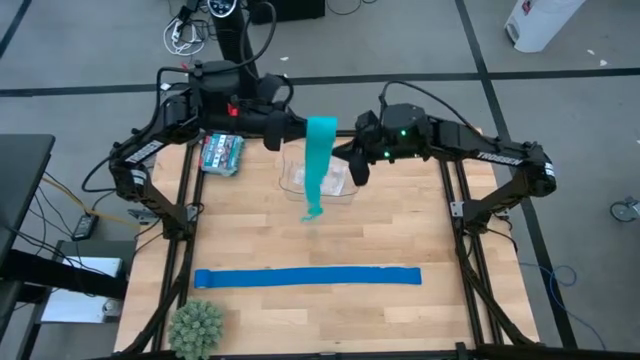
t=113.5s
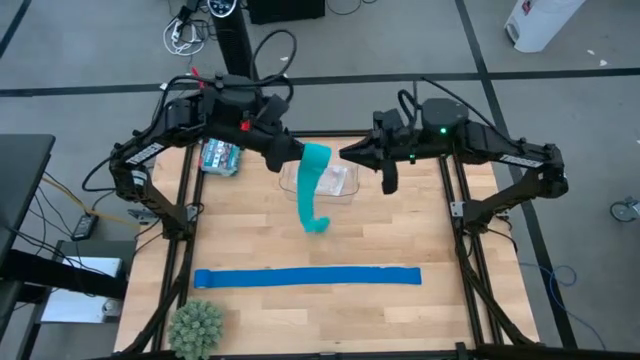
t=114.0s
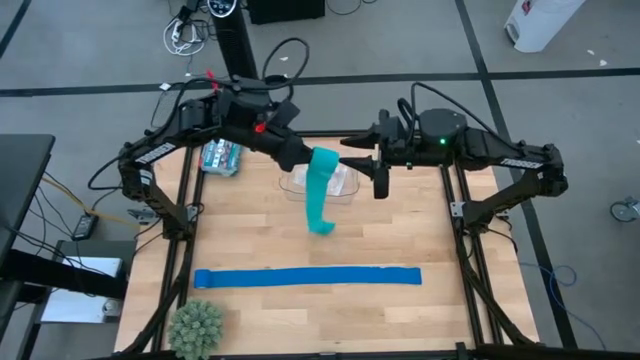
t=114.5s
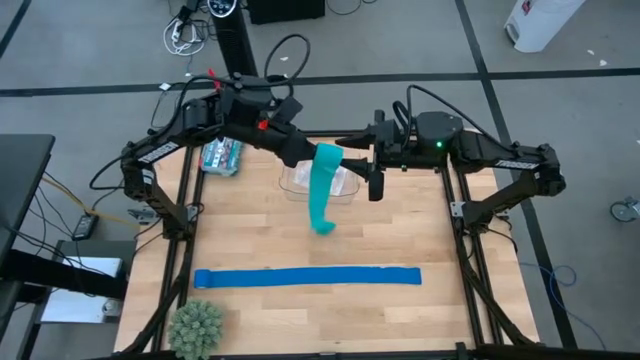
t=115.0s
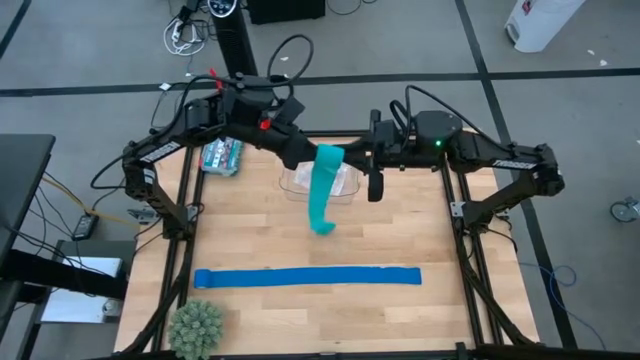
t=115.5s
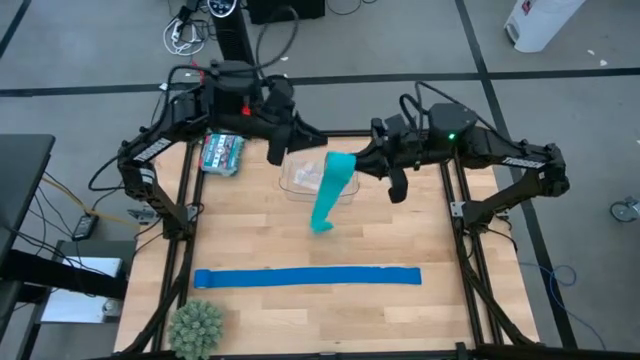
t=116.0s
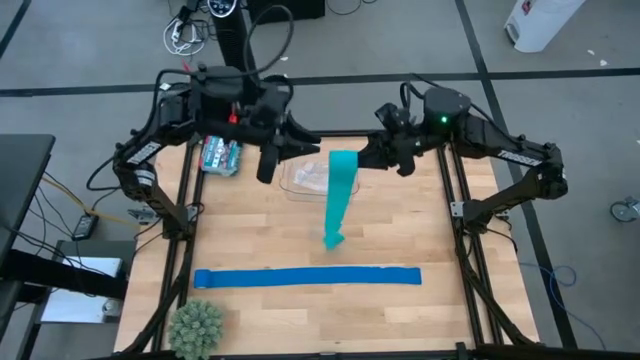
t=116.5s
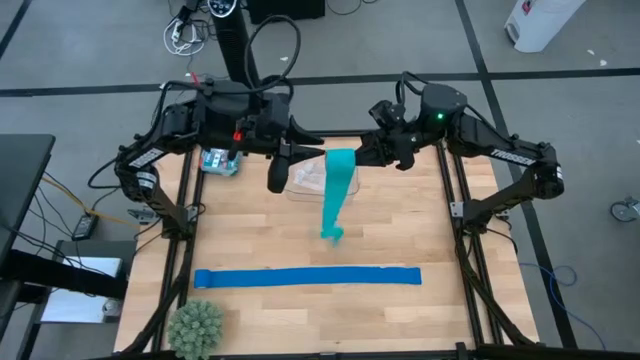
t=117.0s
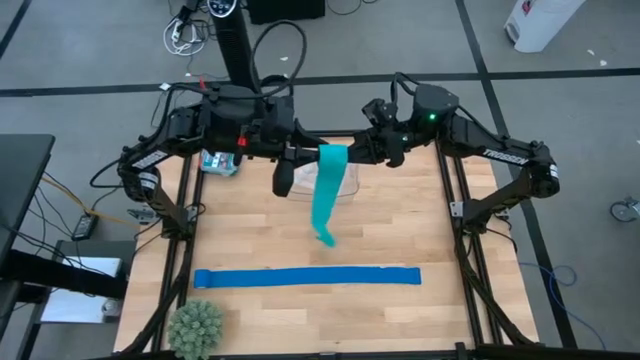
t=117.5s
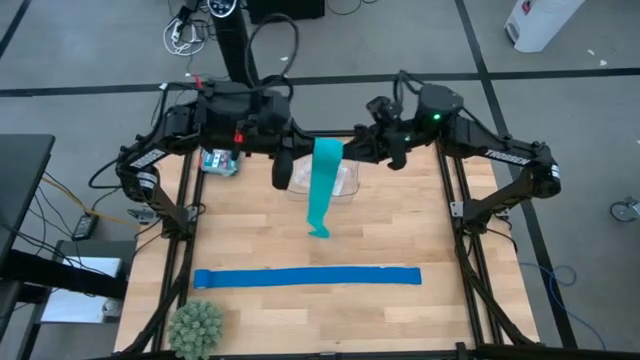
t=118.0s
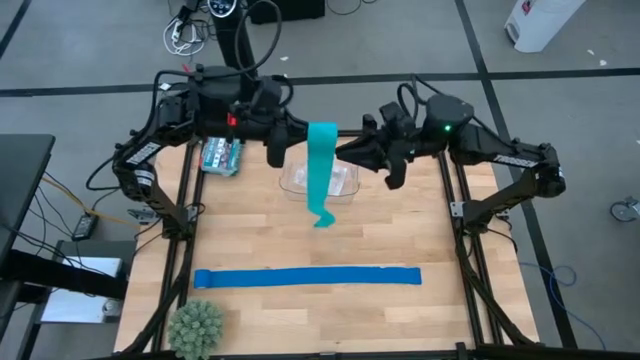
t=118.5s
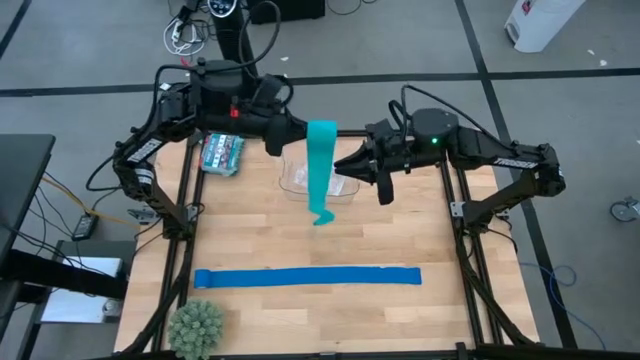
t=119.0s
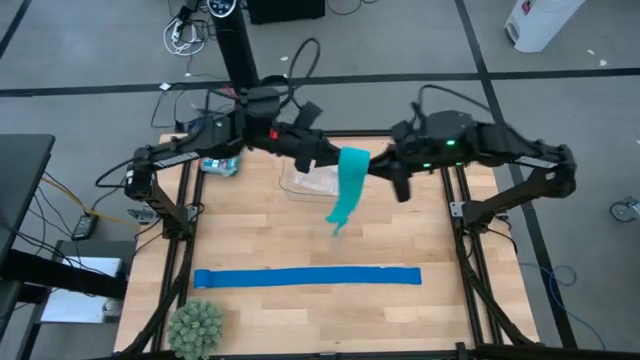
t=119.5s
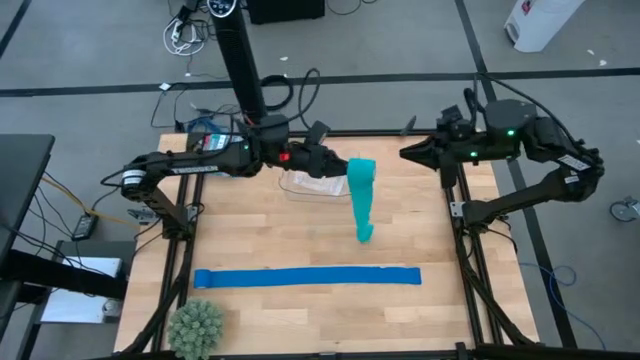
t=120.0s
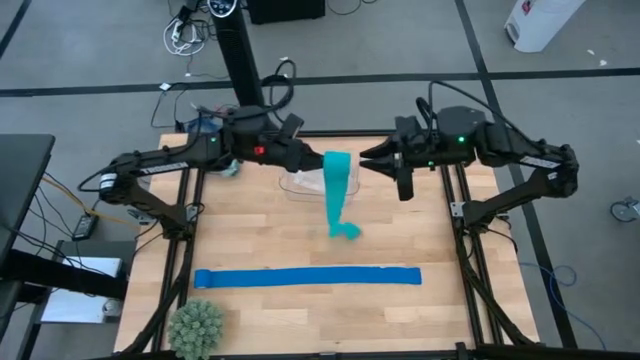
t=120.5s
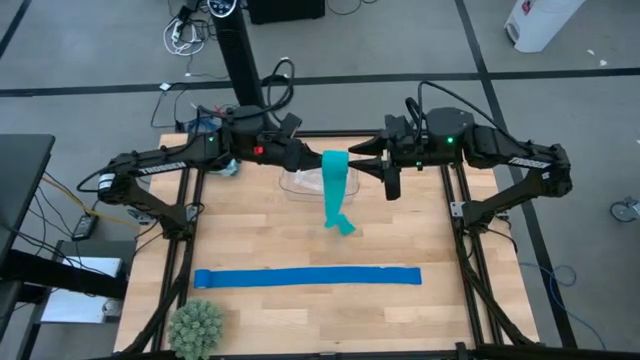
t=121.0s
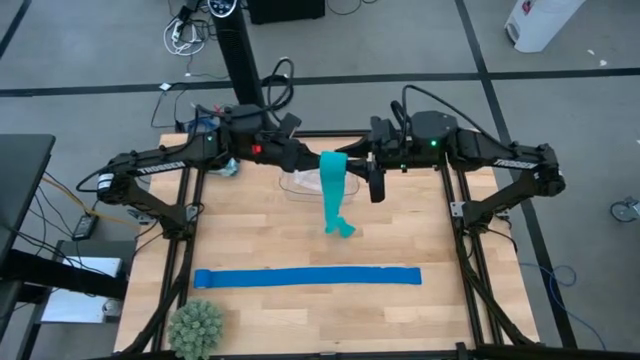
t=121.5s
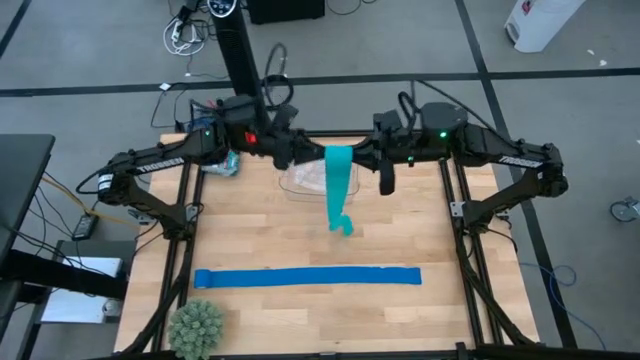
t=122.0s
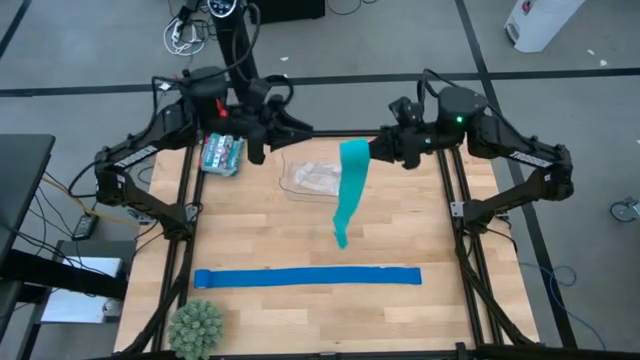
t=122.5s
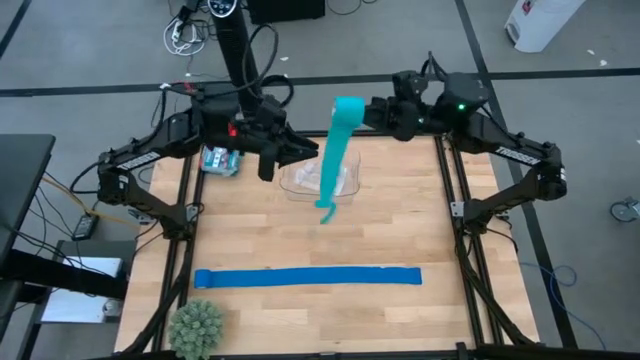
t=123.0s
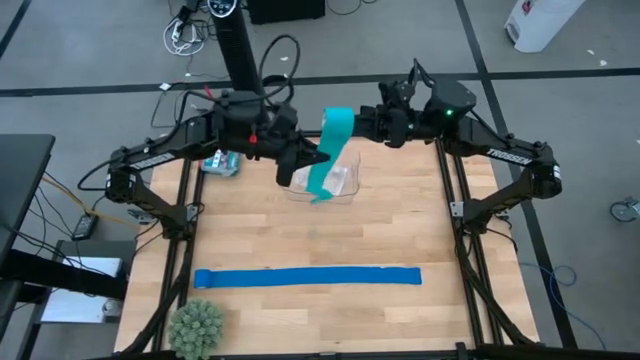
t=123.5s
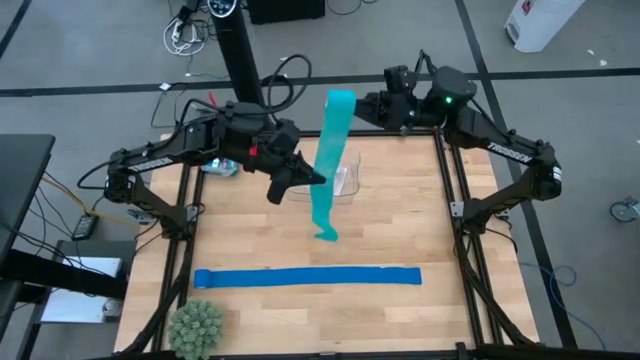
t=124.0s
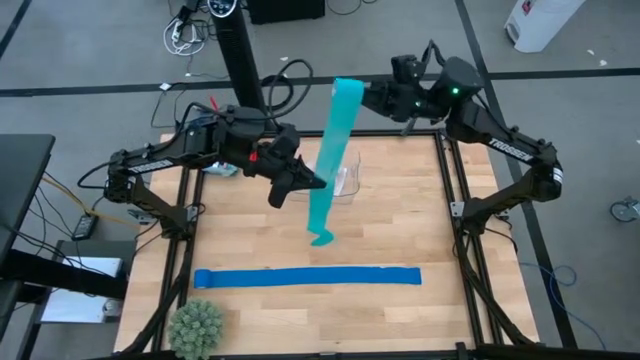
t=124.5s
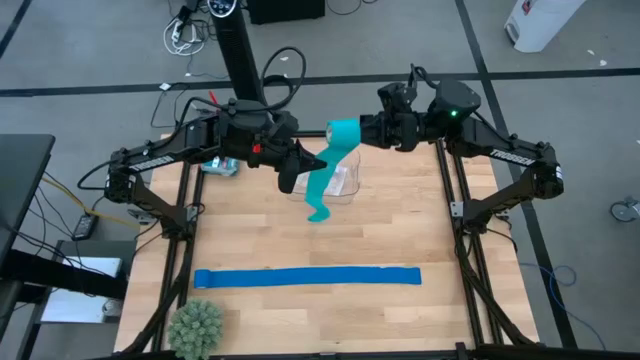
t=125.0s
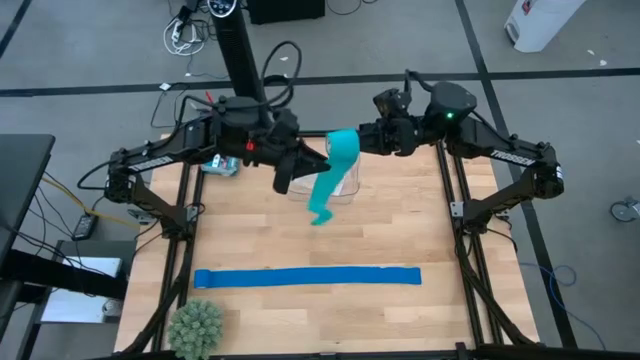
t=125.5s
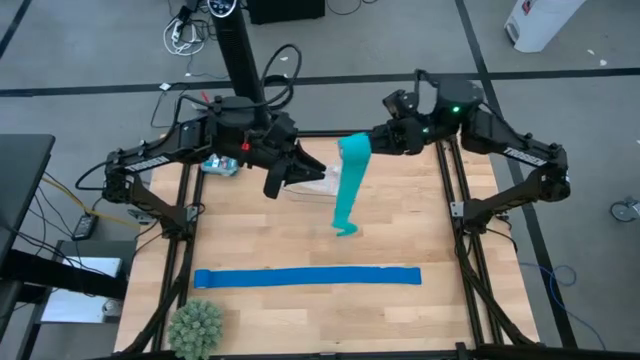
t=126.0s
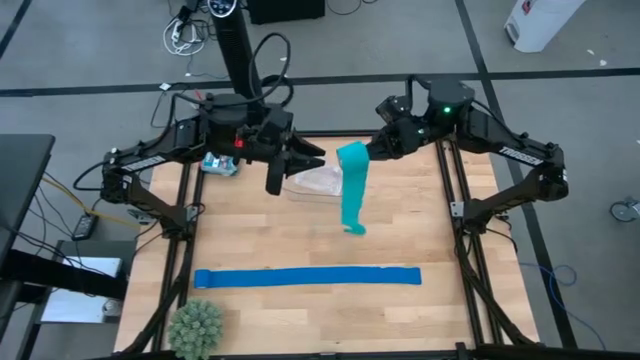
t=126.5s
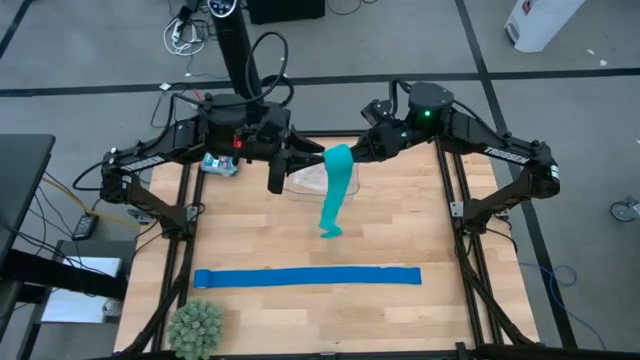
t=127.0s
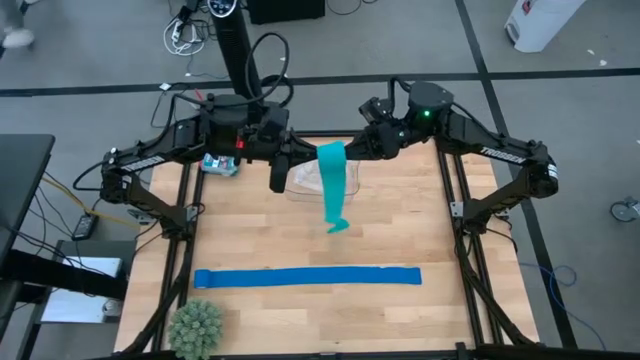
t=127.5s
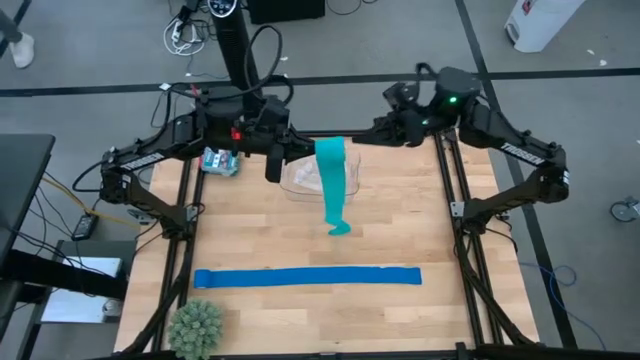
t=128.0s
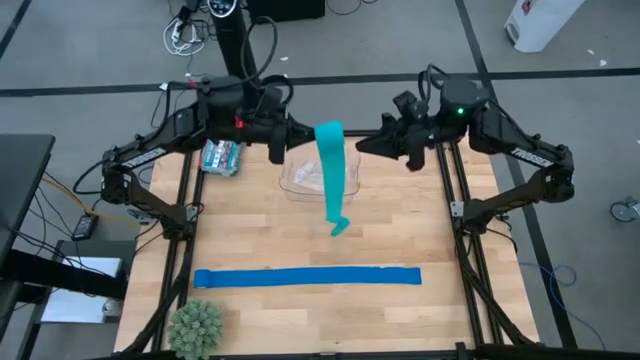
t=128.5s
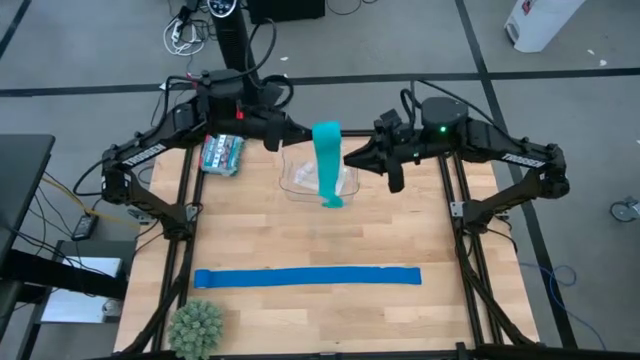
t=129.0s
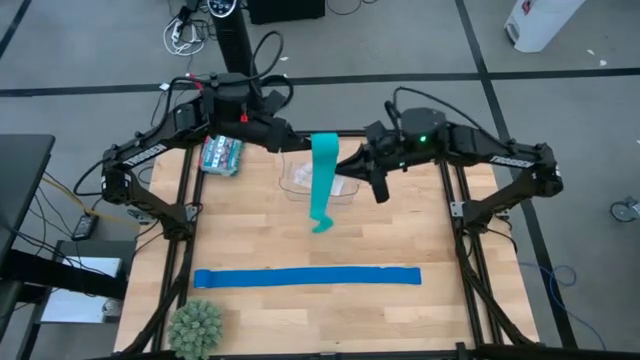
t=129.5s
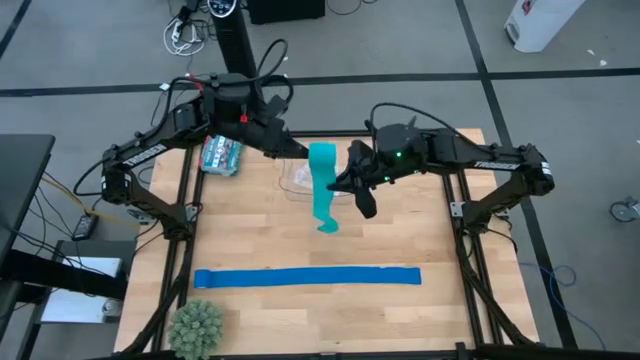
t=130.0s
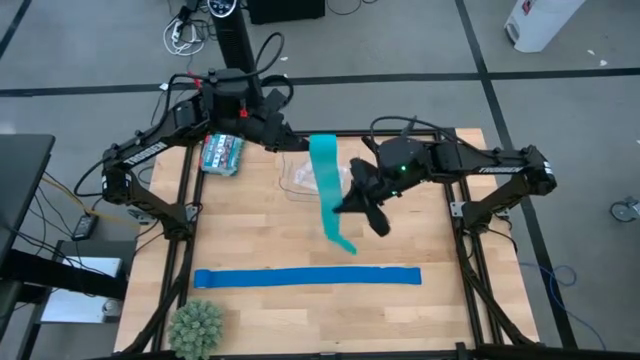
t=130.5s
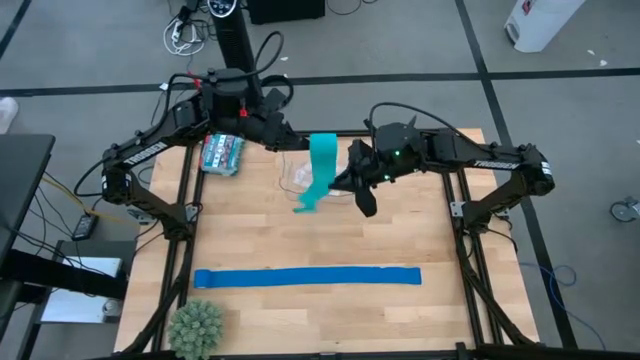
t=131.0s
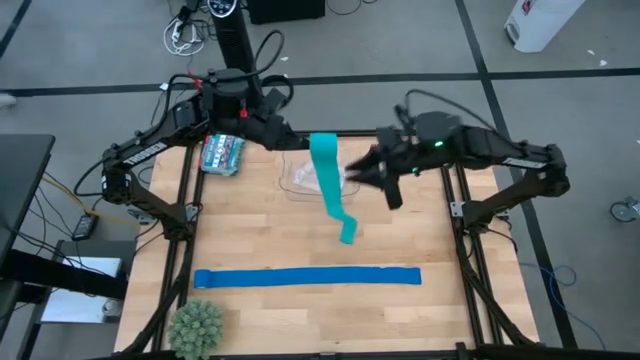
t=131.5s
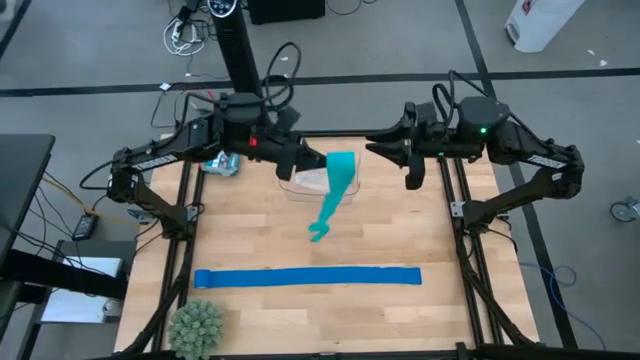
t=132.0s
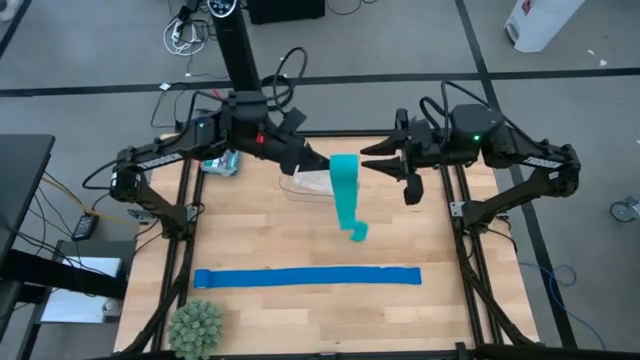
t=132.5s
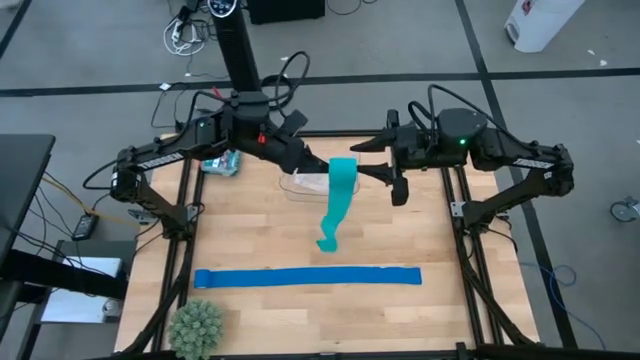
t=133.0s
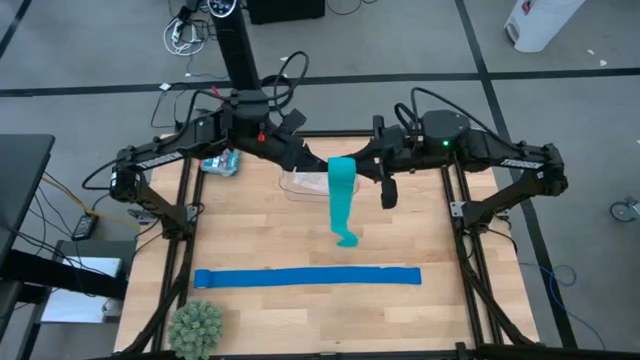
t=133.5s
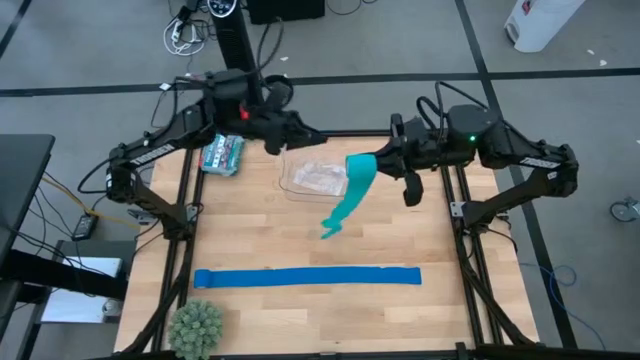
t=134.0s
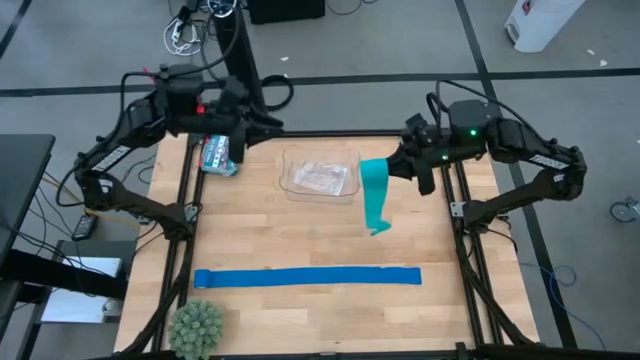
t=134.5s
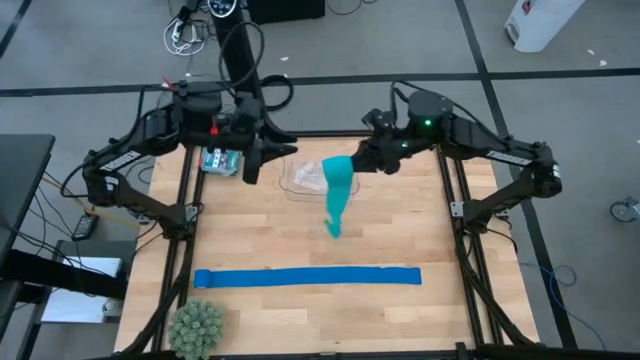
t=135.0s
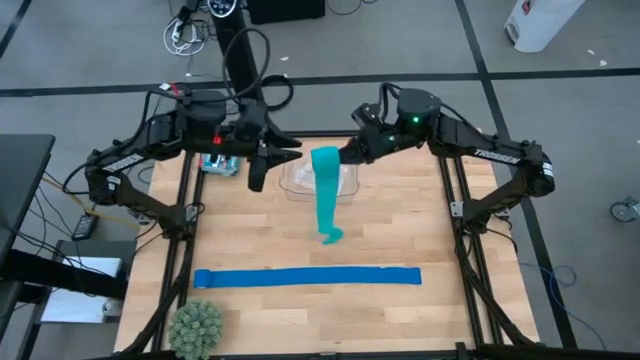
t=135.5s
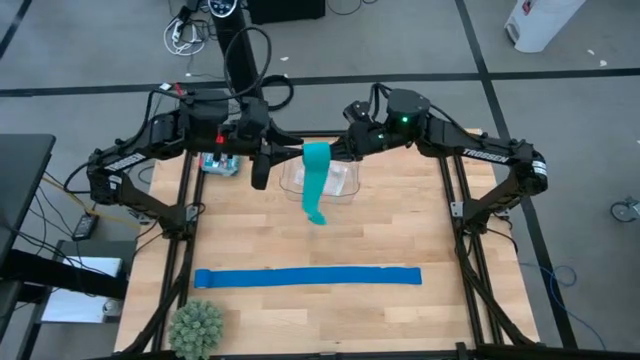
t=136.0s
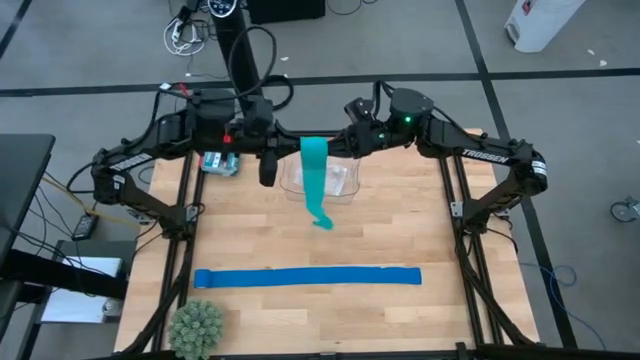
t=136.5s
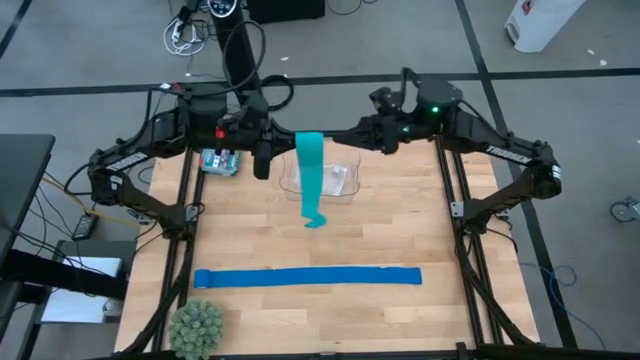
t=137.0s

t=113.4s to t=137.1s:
Task: Roll bandage
Roll the green bandage
